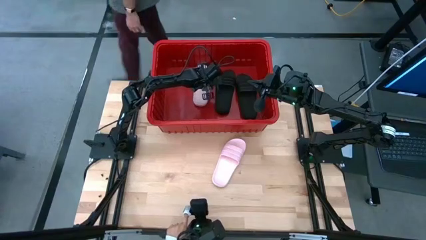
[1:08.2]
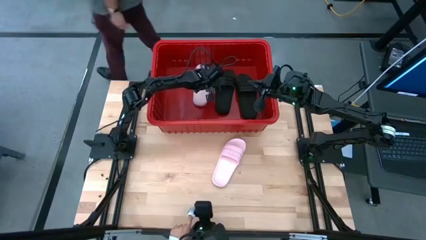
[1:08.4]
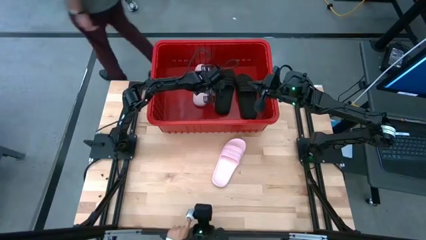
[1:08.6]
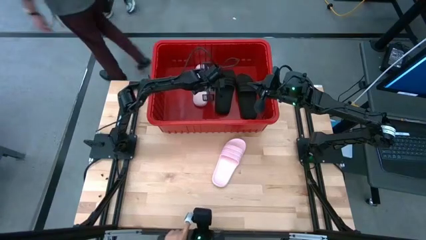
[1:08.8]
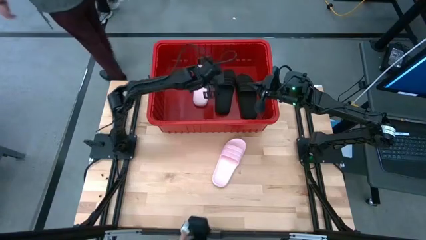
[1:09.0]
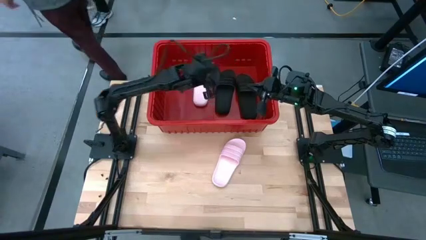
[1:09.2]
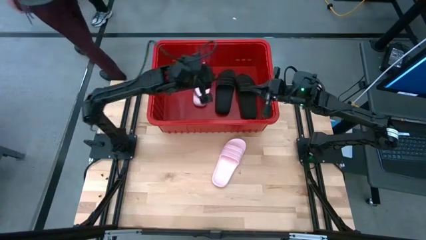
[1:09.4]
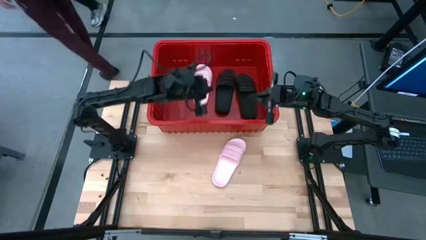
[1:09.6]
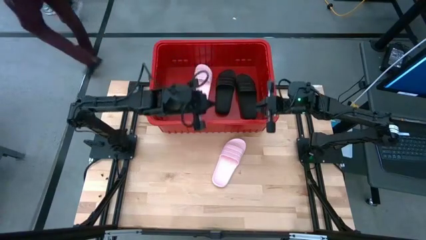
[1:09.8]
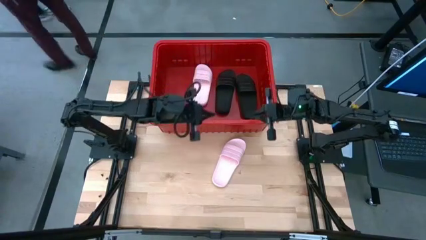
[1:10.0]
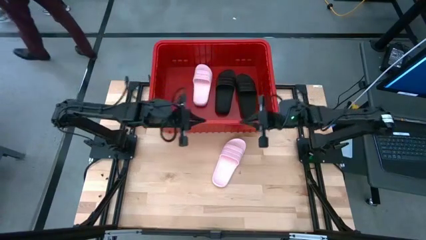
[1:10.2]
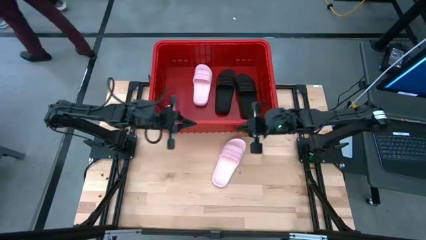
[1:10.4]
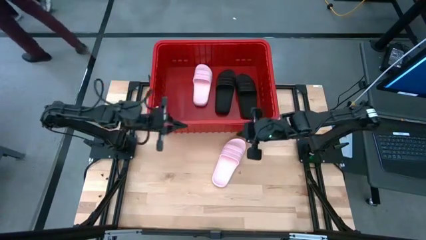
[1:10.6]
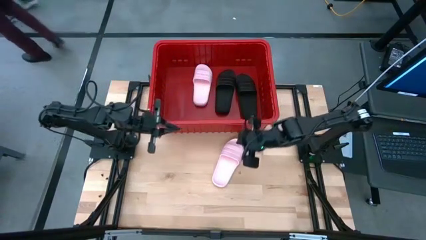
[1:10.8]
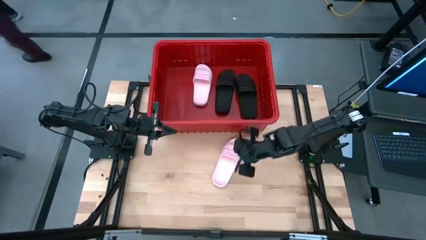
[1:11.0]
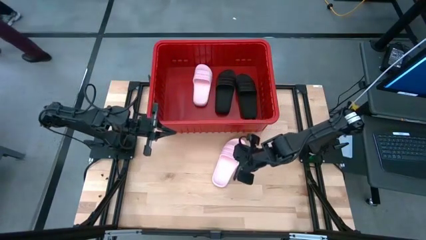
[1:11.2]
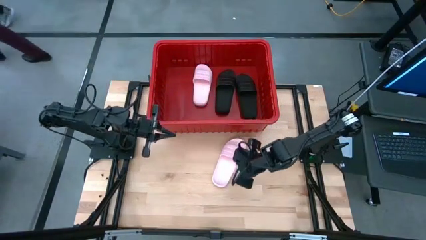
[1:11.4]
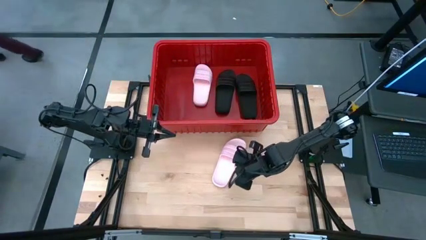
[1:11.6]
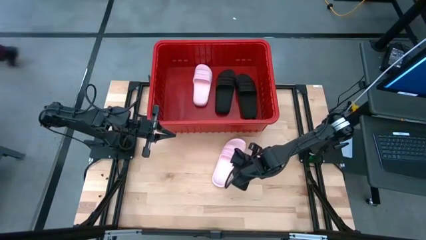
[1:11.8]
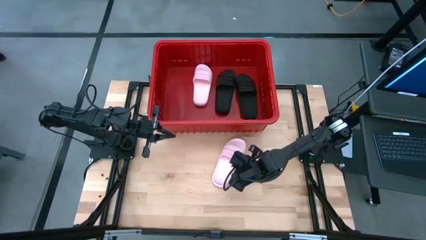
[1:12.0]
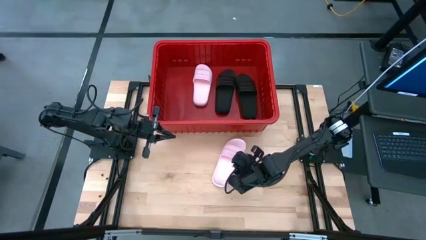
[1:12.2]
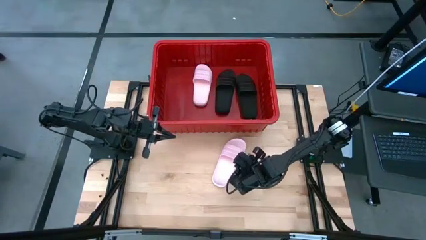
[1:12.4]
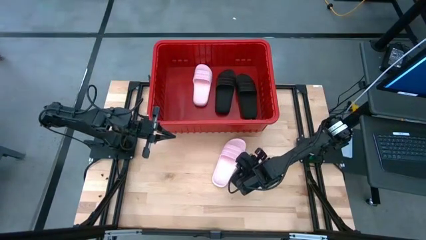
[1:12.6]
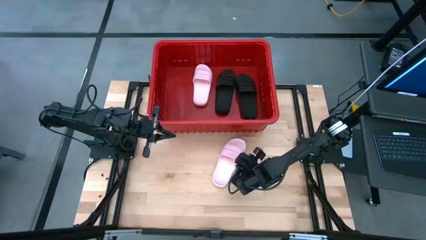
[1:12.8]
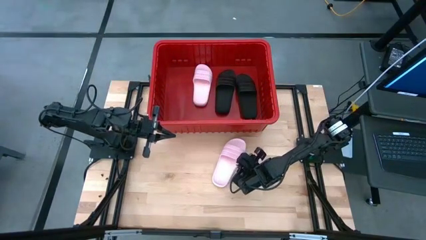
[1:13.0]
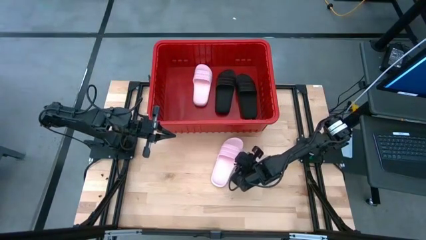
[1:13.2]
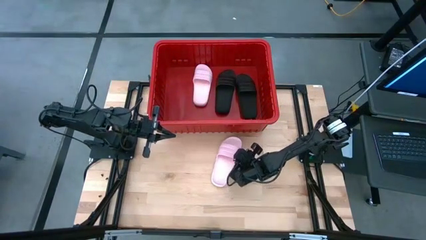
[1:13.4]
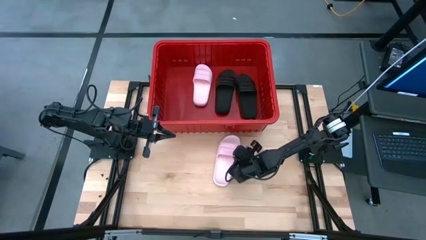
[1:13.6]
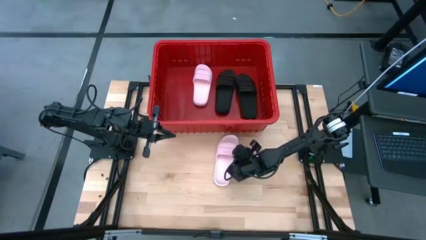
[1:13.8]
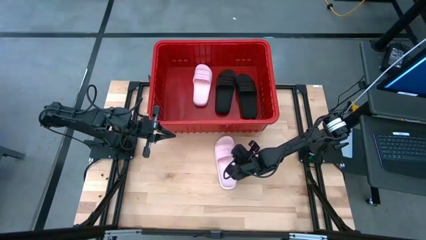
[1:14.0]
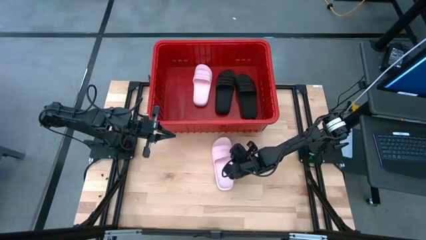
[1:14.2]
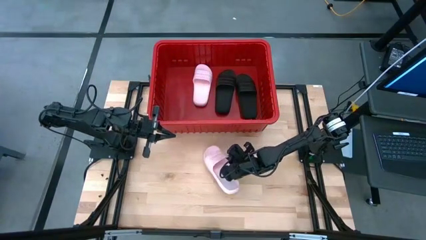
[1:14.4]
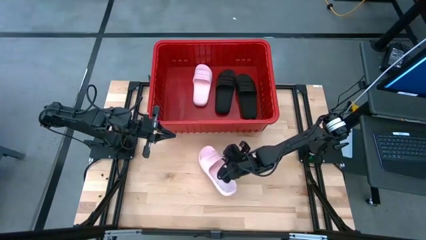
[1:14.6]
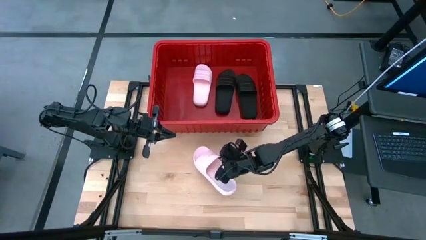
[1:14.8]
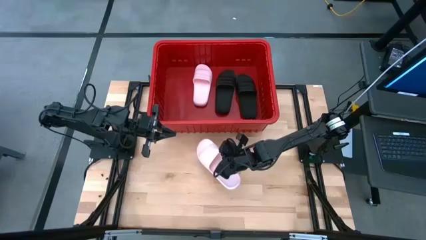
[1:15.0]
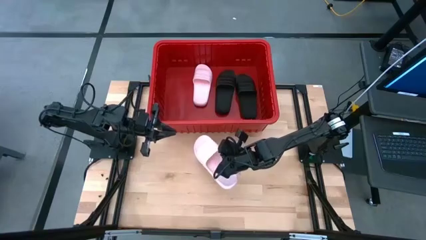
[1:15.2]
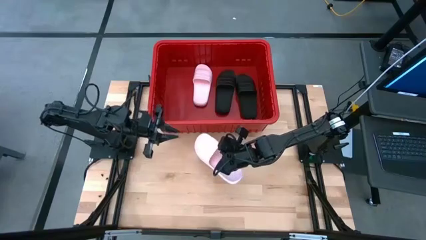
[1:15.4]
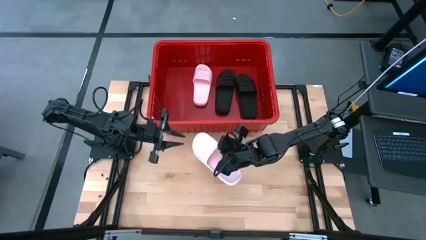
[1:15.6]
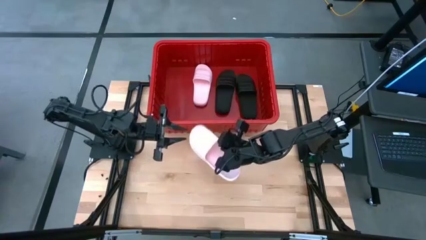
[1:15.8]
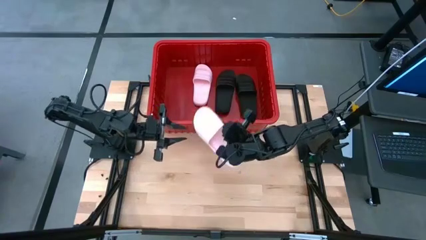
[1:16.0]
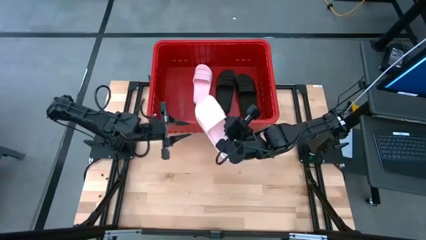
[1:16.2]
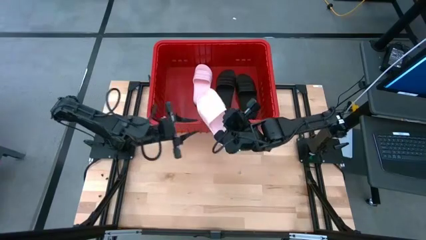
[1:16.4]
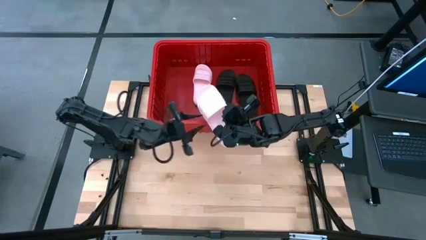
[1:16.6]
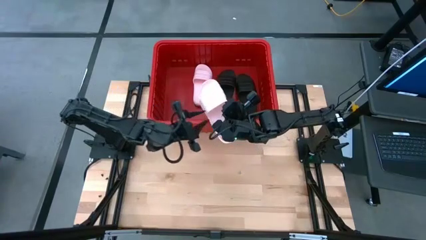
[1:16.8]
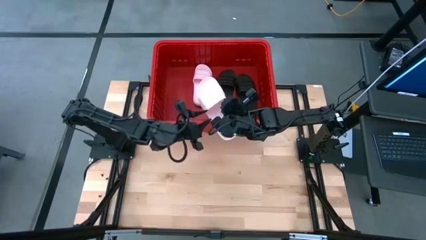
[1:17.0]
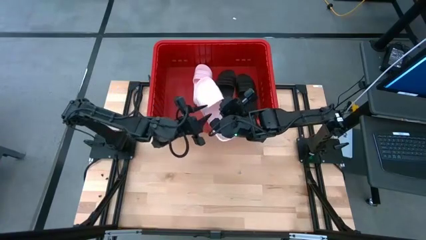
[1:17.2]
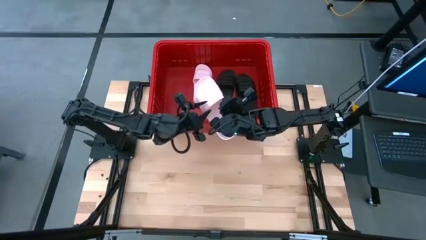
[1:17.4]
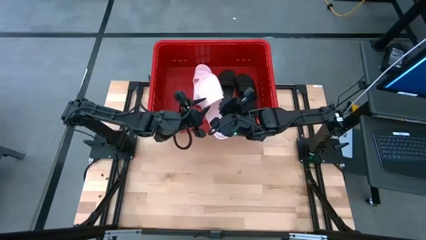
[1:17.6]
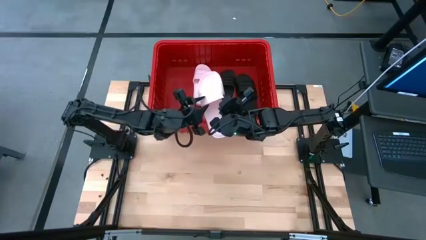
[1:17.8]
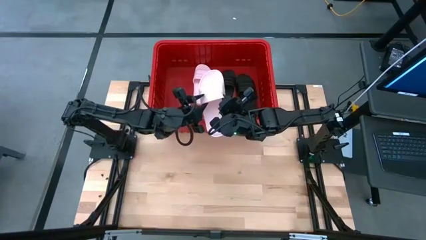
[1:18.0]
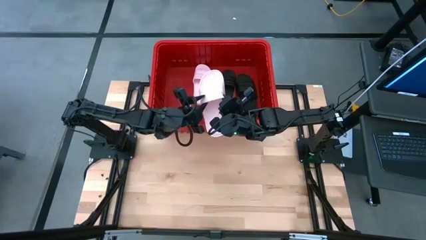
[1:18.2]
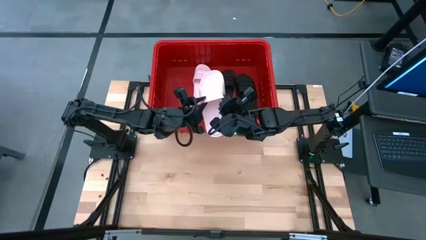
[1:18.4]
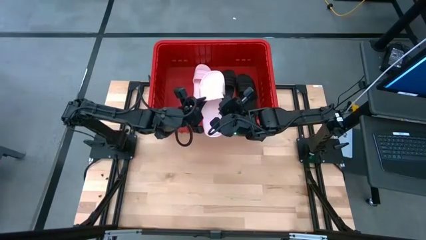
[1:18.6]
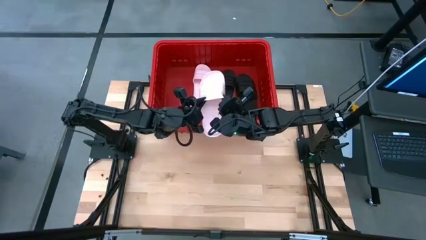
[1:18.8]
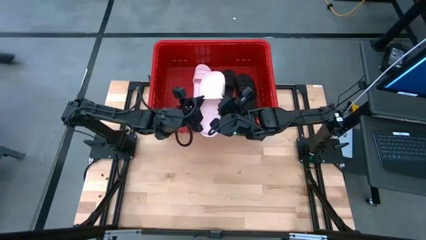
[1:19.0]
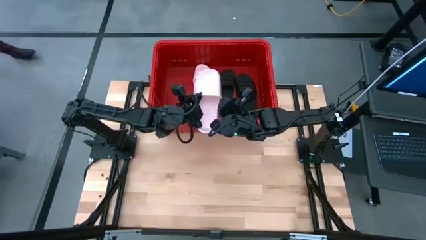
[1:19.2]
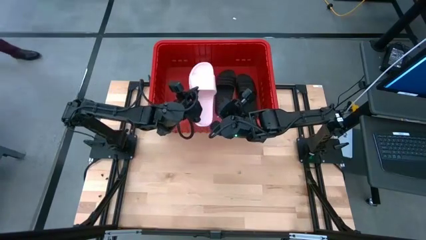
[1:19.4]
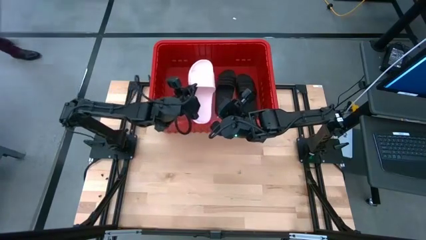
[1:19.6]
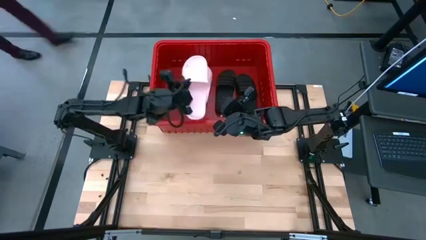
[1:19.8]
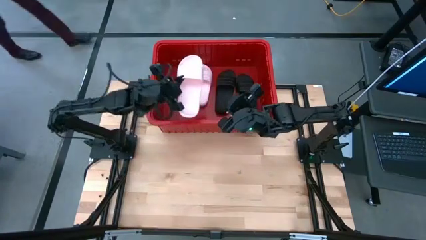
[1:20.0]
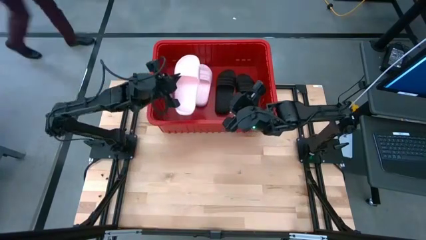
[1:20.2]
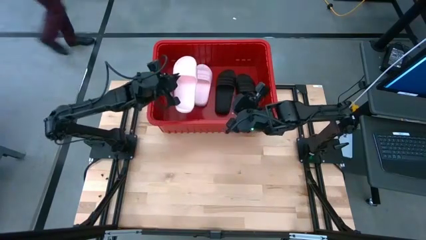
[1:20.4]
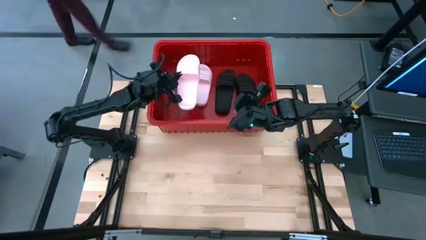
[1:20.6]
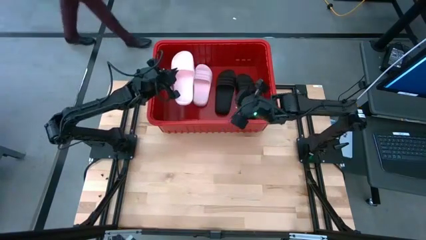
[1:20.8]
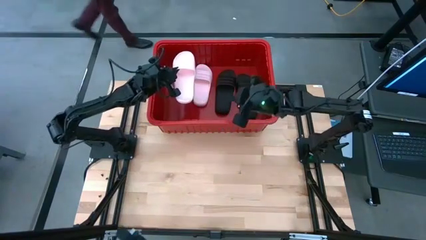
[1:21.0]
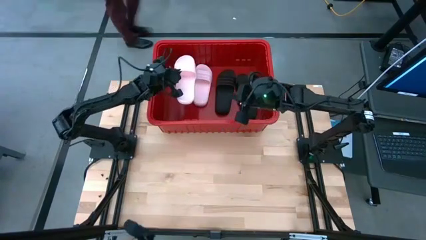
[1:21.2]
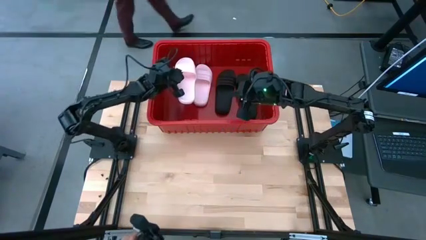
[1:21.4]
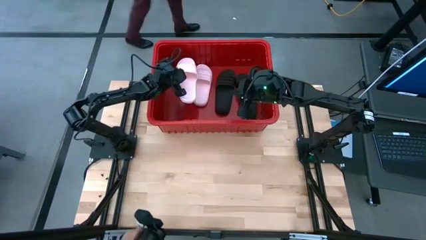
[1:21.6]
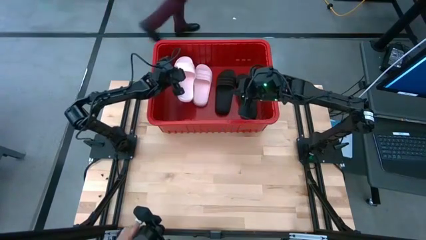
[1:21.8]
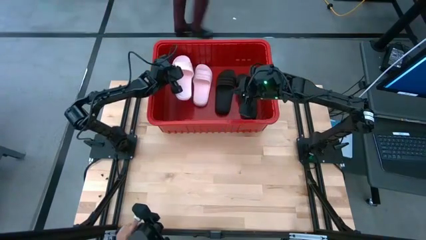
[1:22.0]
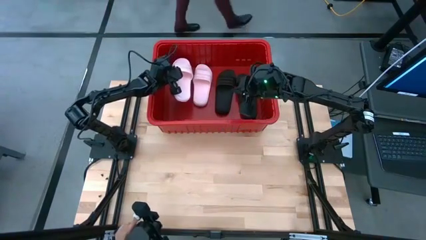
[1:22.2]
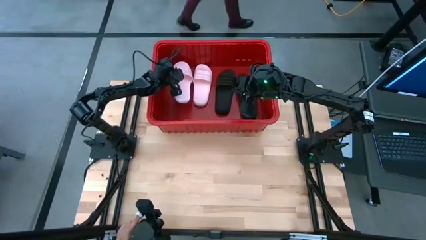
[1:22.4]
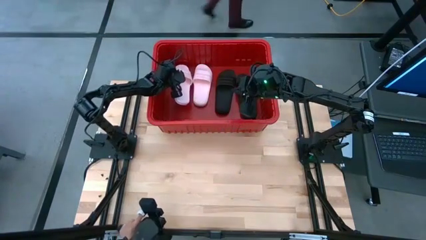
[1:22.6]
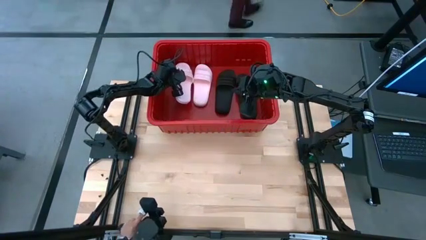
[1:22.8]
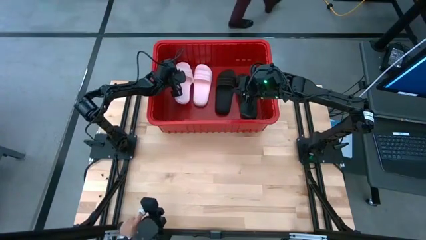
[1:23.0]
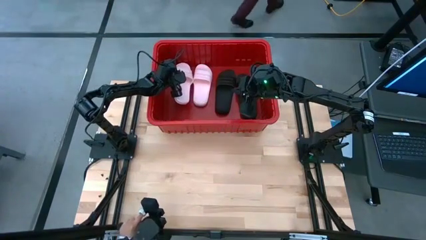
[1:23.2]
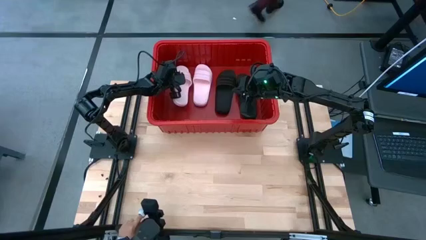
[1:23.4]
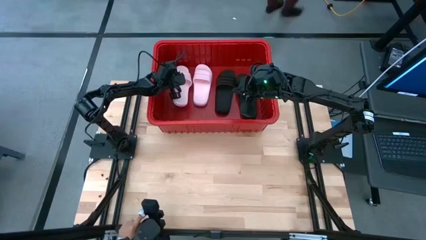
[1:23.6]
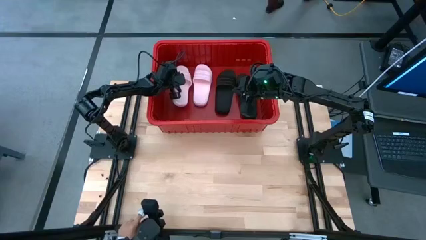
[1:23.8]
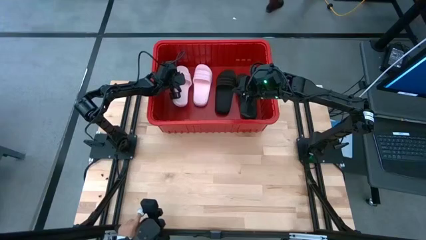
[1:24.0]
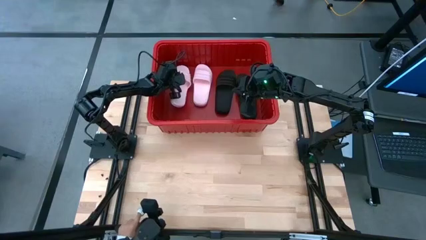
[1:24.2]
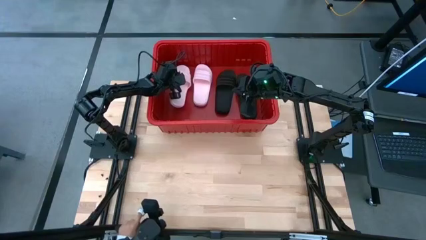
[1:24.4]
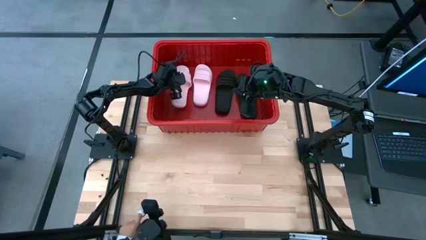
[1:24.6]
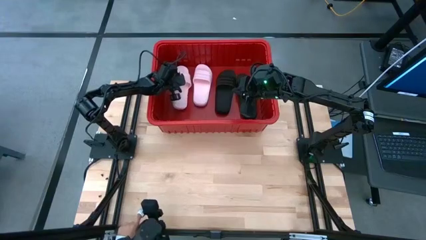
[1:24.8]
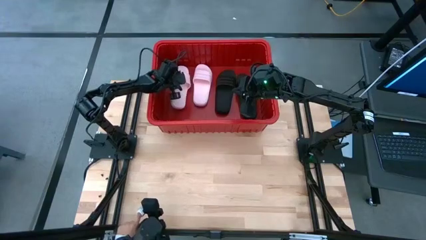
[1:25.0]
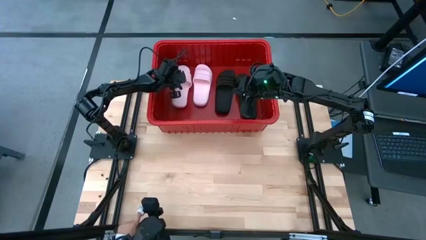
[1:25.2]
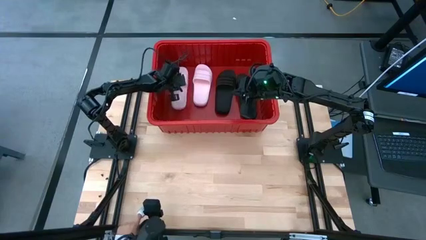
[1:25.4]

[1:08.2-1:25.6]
Task: Pick and place slides into bin
Put the pink slide into the bin
